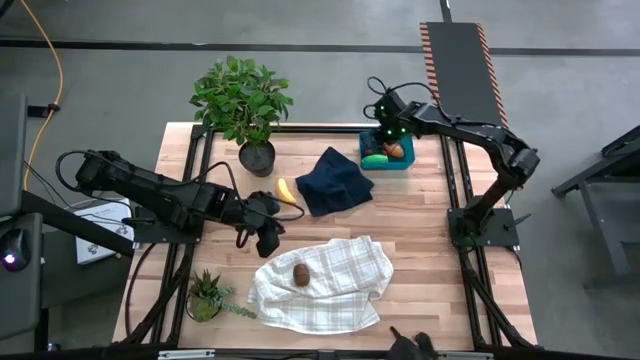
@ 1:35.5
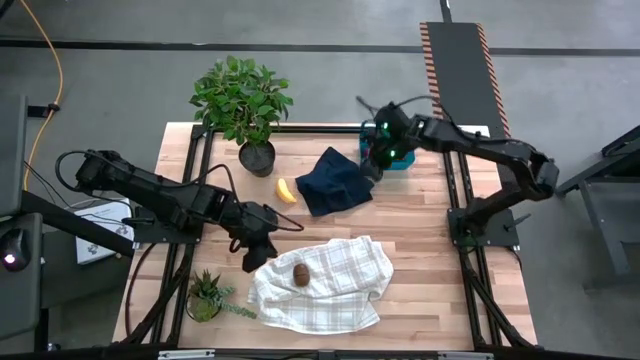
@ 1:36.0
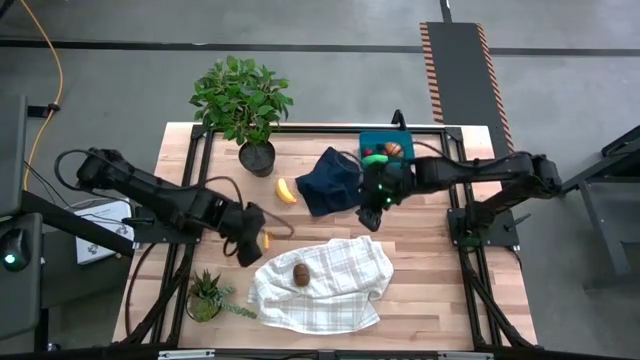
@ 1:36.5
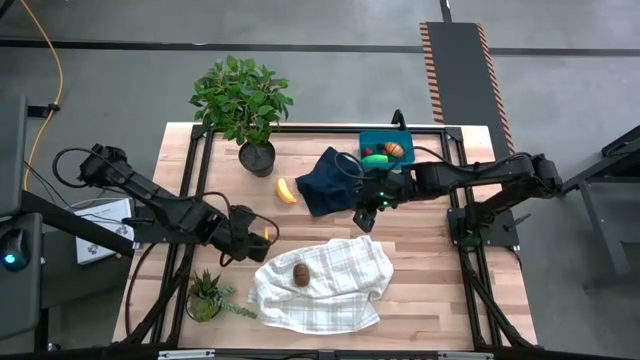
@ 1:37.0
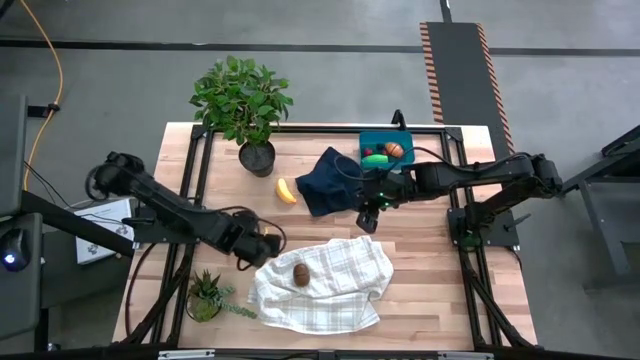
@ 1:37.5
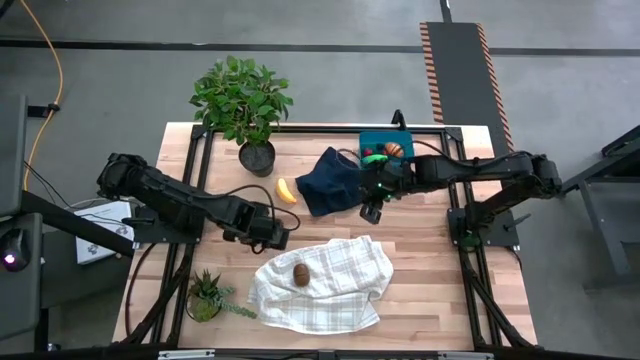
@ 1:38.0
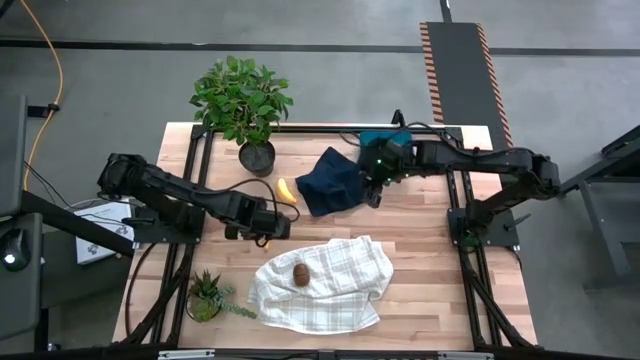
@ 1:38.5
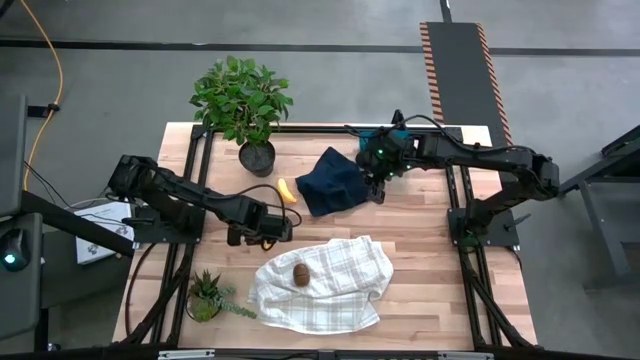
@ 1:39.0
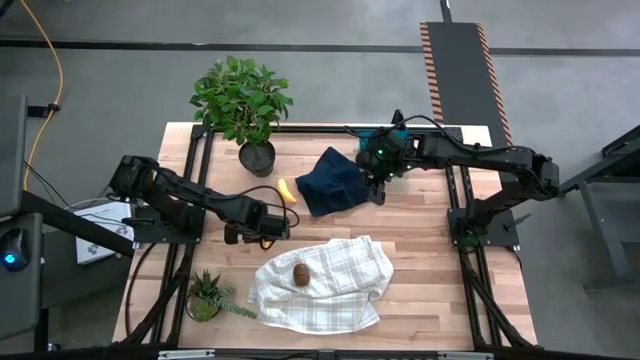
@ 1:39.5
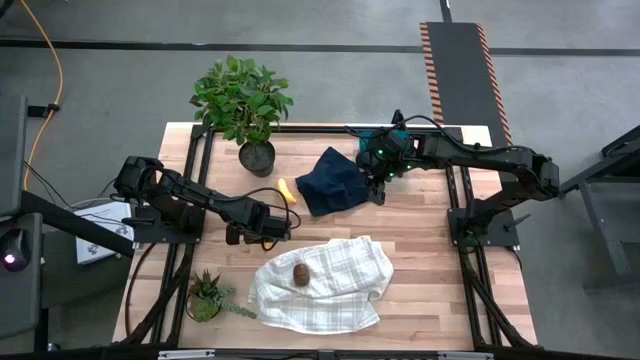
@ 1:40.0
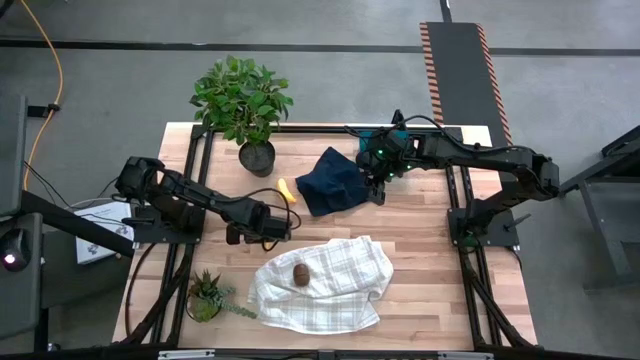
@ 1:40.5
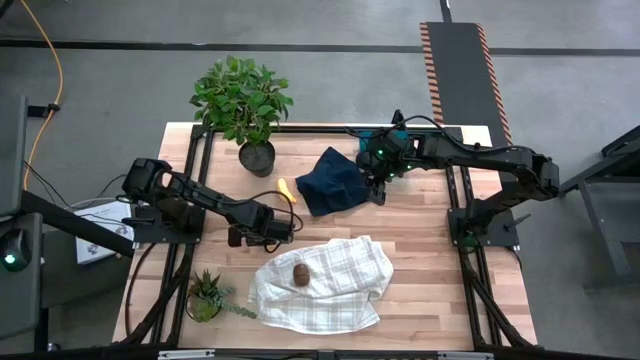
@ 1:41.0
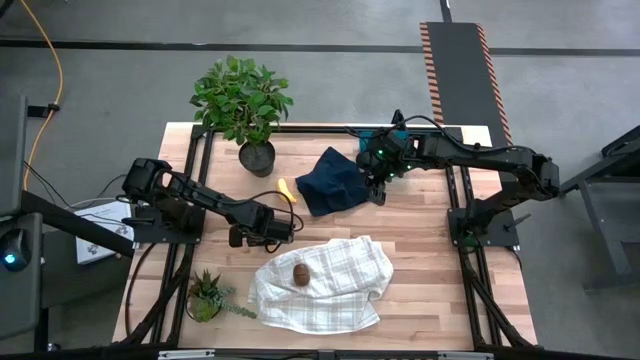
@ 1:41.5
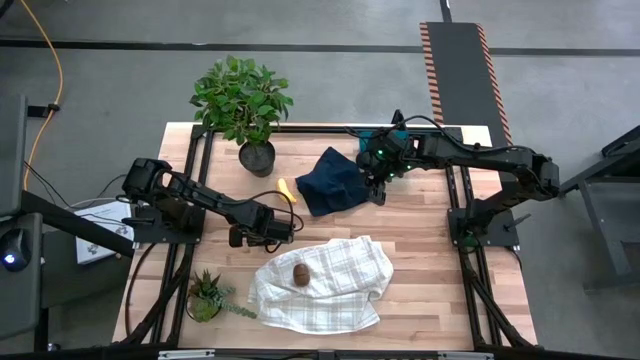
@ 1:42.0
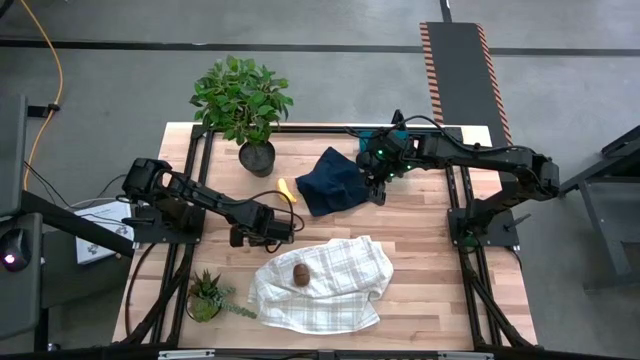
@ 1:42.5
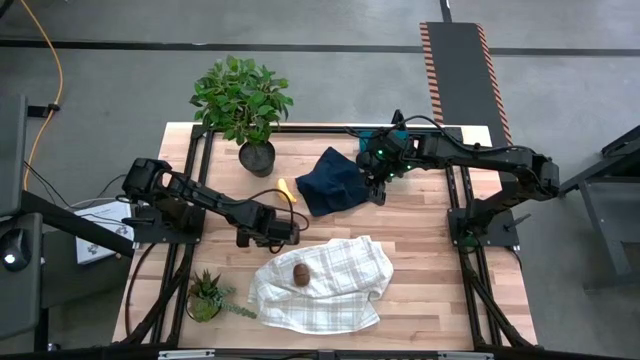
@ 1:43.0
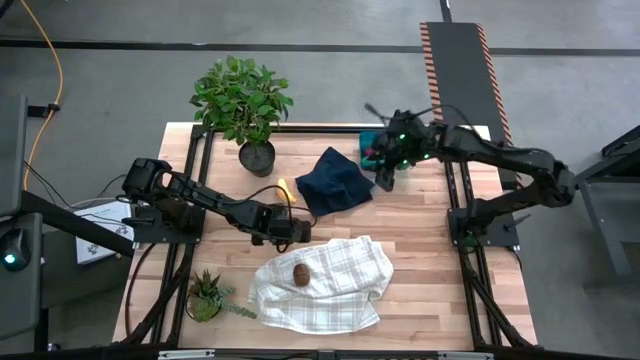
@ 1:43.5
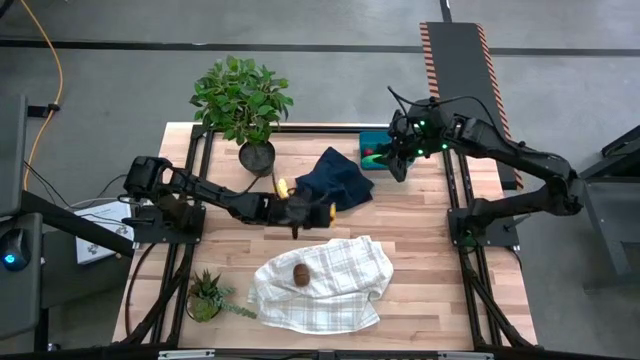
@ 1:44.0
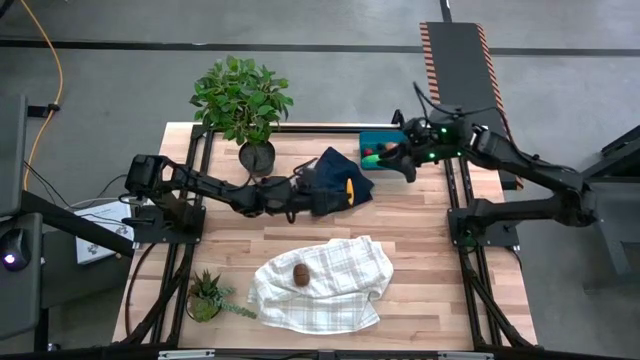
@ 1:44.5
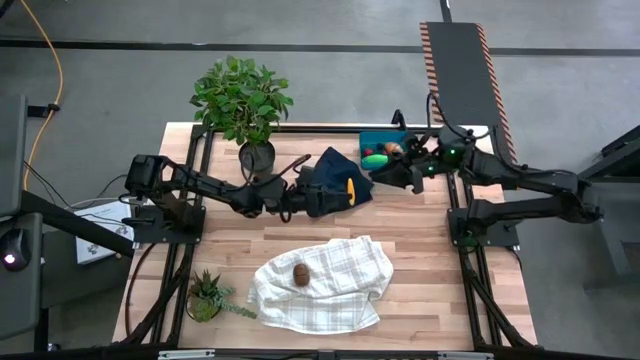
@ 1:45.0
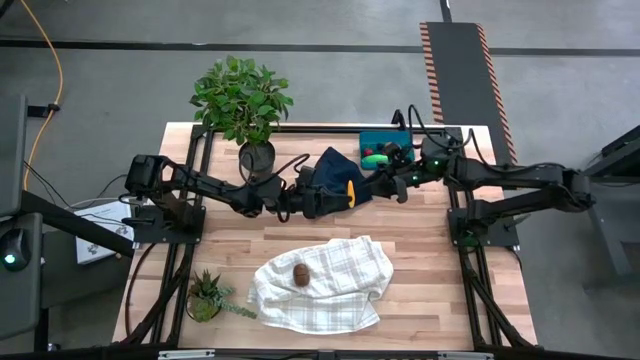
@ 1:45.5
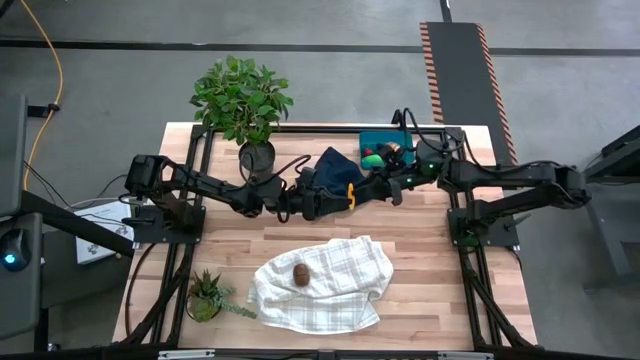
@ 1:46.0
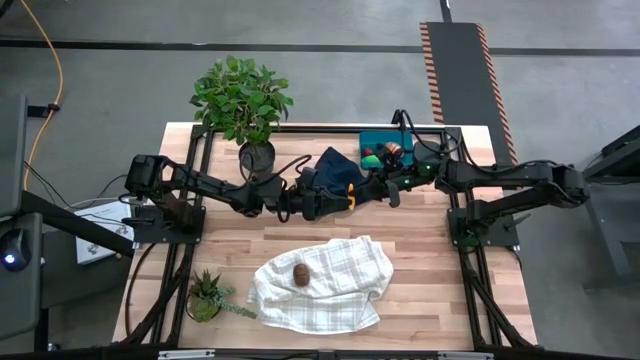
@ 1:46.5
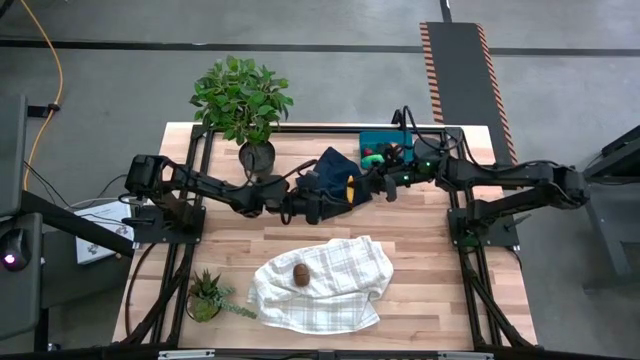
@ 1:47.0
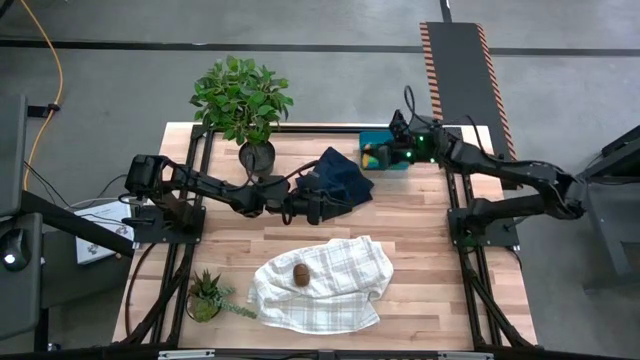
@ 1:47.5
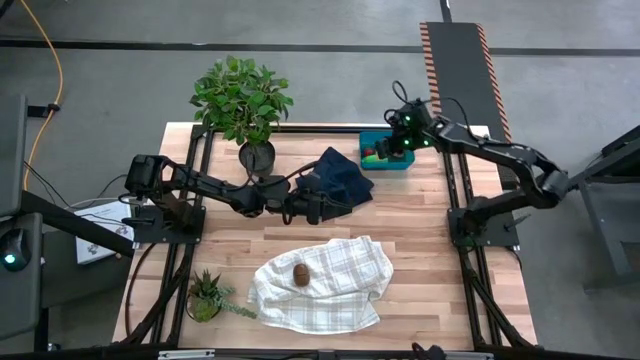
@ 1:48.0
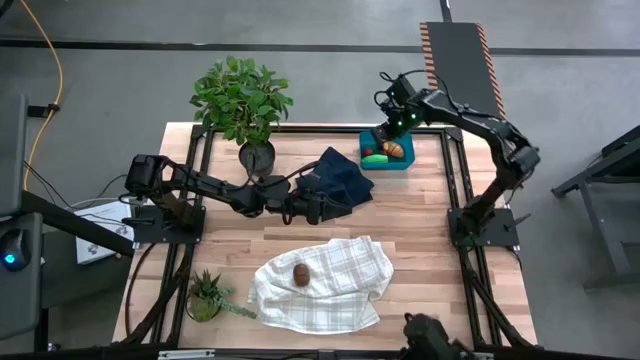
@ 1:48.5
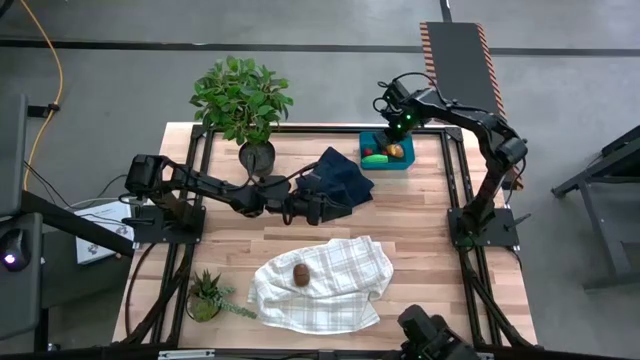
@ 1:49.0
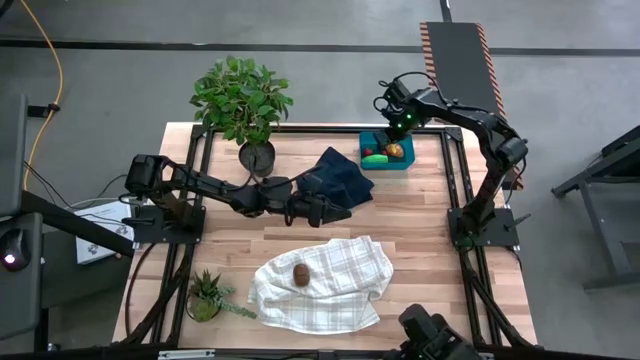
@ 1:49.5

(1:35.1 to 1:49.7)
Task: Pick and placing Produce into tupperware
Put the yellow corn into the blue bin

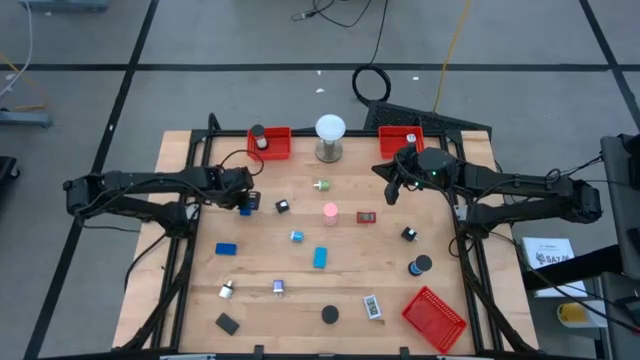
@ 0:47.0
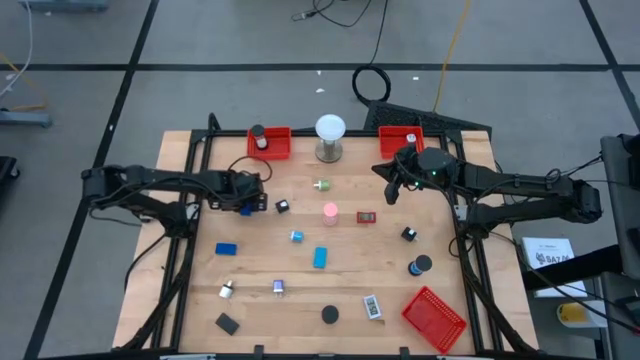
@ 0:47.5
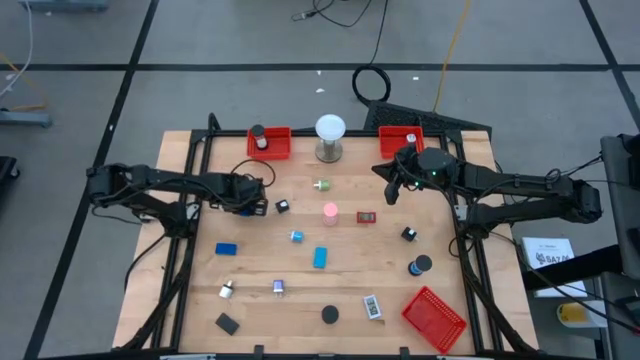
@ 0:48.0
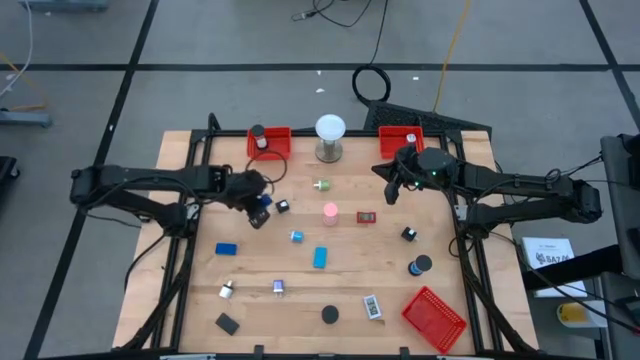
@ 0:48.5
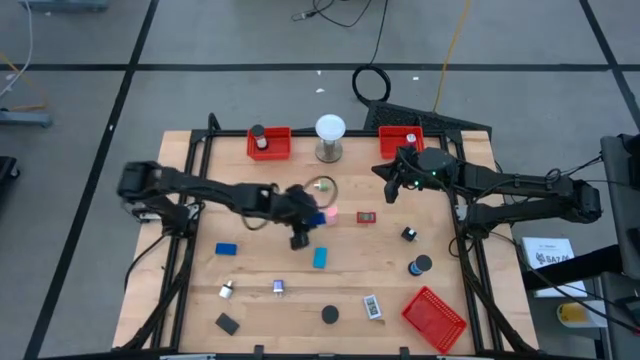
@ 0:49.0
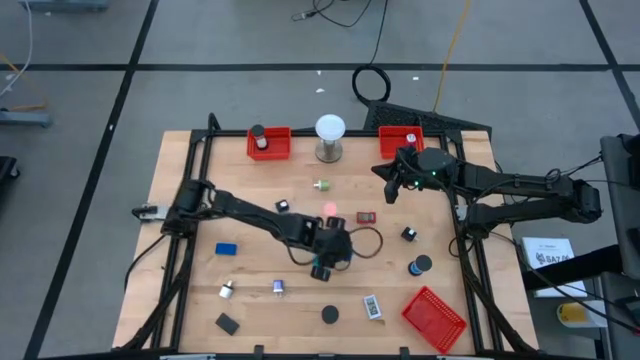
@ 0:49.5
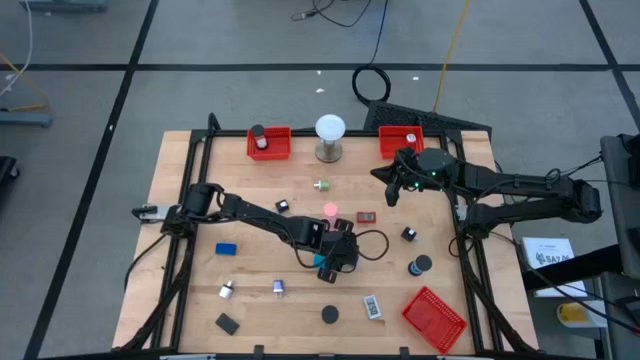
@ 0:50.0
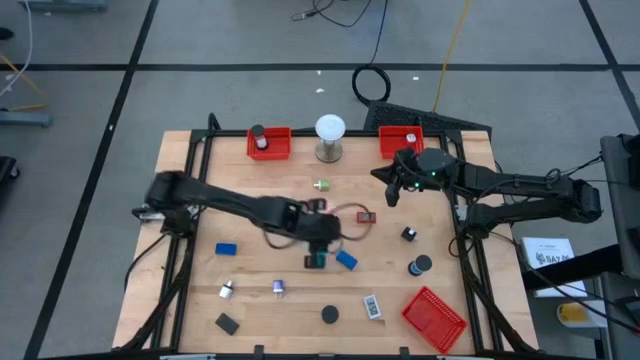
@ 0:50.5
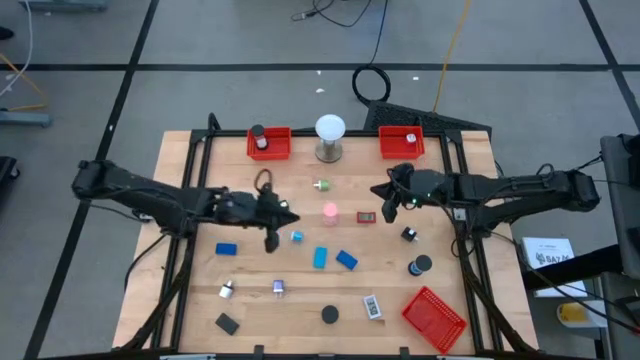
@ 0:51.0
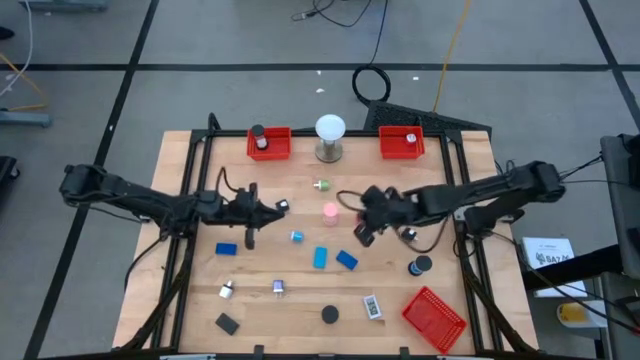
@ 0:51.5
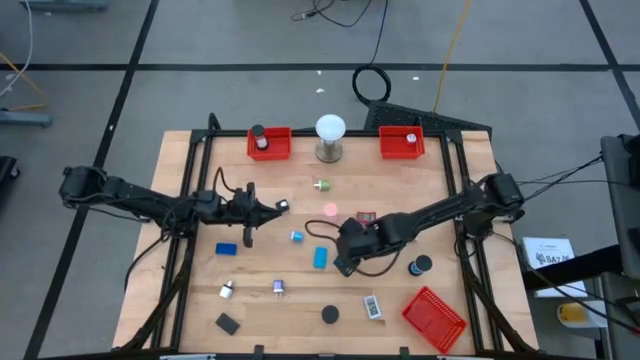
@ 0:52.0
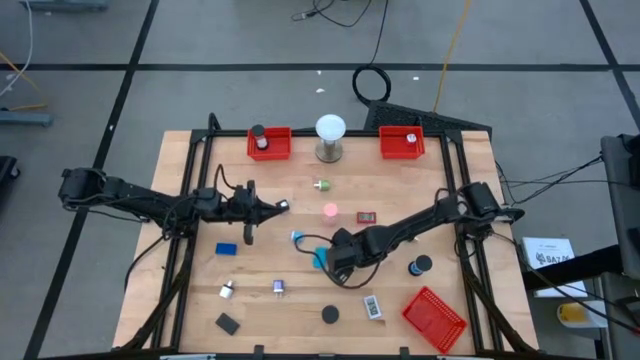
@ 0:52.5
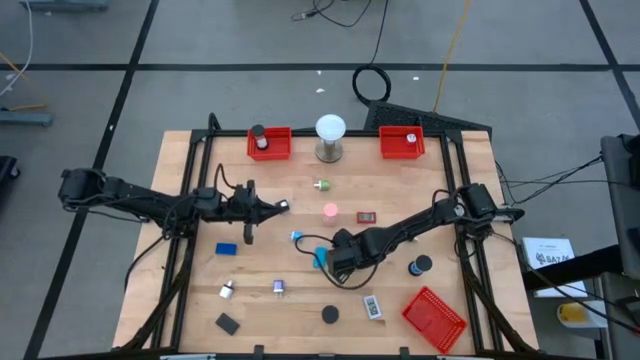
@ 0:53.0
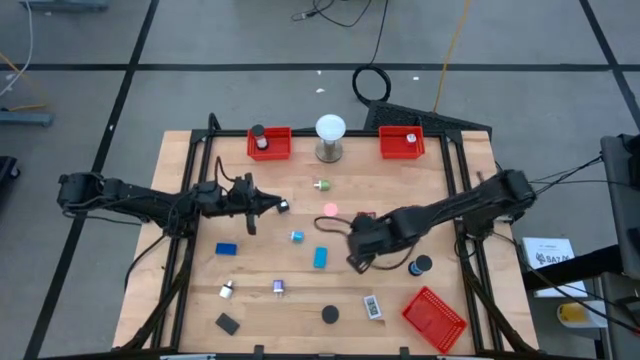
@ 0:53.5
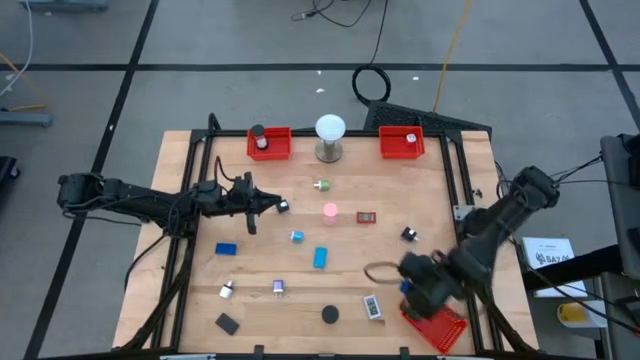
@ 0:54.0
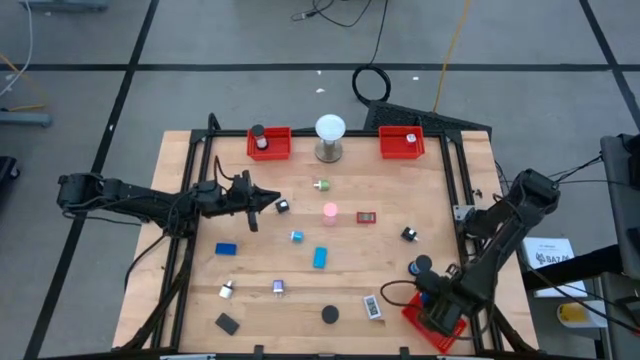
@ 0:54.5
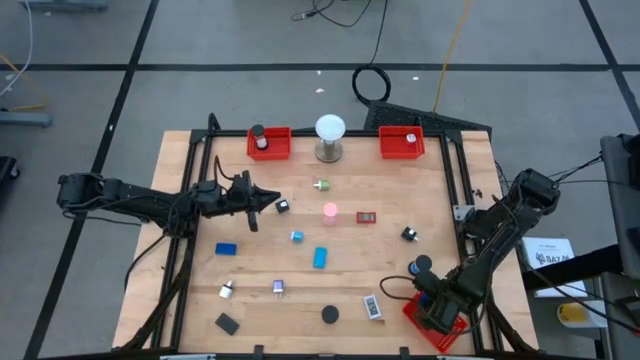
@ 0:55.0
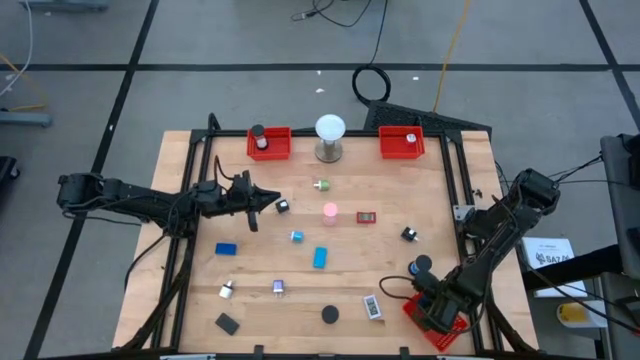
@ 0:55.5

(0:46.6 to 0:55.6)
Task: Pick & Place Office items
Put the blue digital clock into the bottom right red bin
